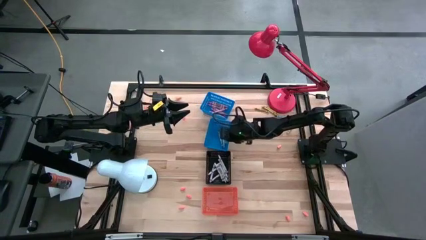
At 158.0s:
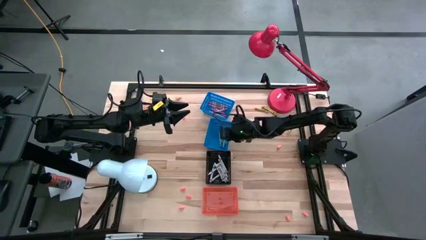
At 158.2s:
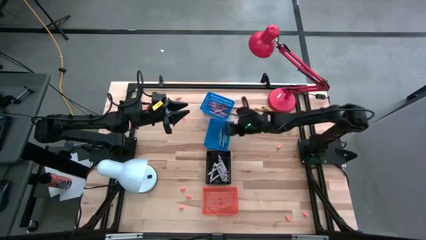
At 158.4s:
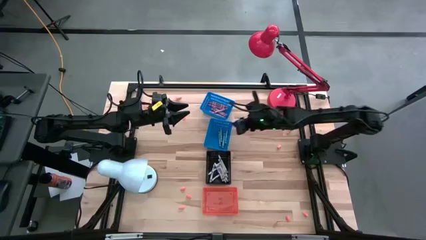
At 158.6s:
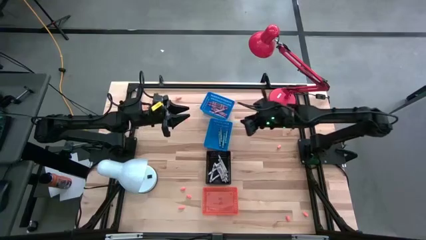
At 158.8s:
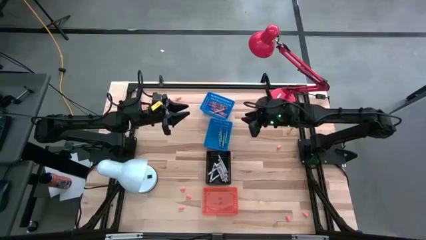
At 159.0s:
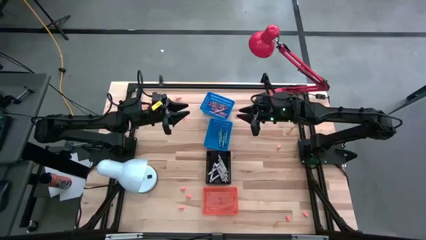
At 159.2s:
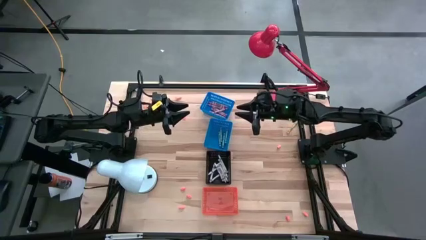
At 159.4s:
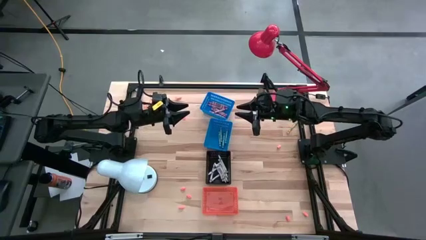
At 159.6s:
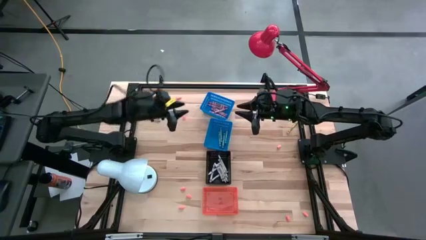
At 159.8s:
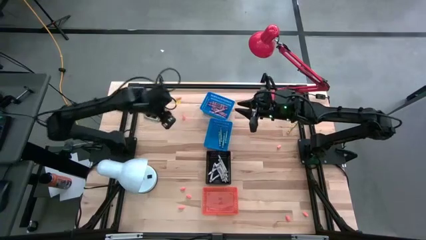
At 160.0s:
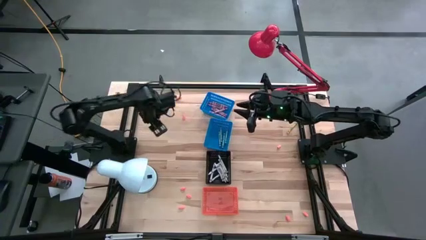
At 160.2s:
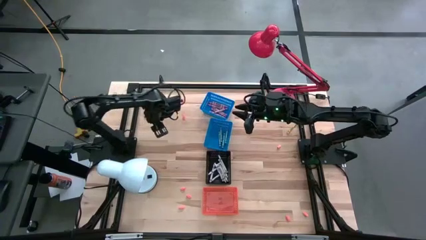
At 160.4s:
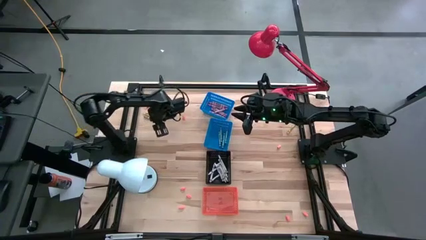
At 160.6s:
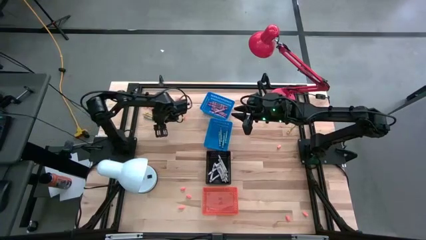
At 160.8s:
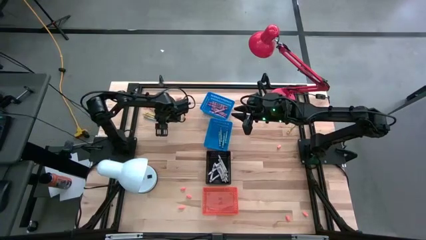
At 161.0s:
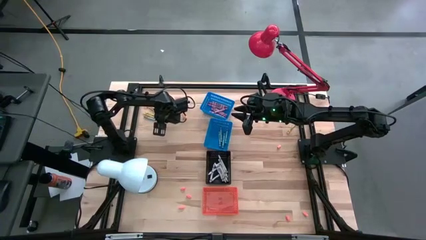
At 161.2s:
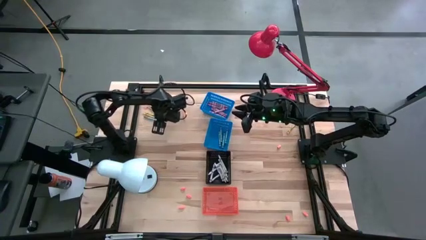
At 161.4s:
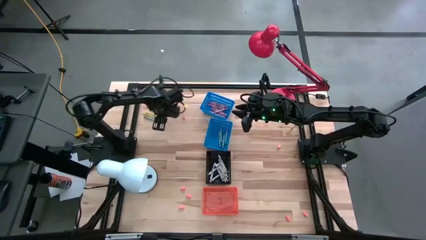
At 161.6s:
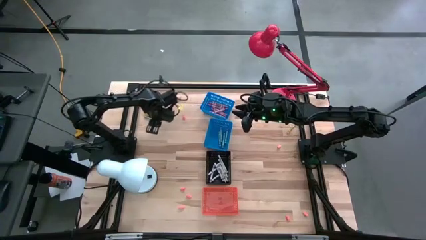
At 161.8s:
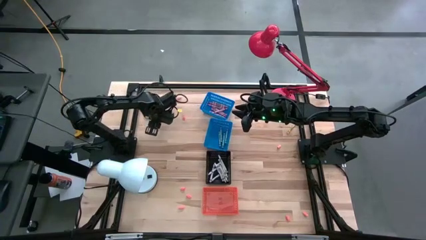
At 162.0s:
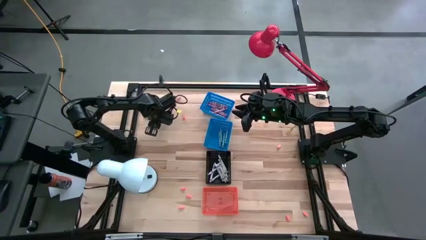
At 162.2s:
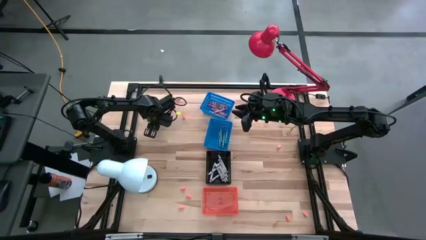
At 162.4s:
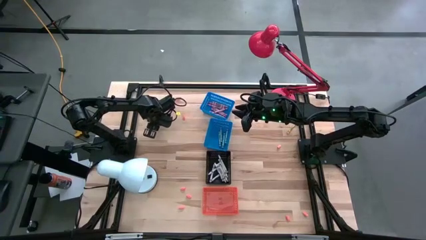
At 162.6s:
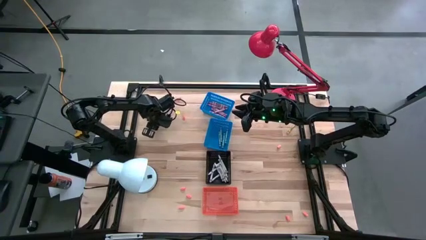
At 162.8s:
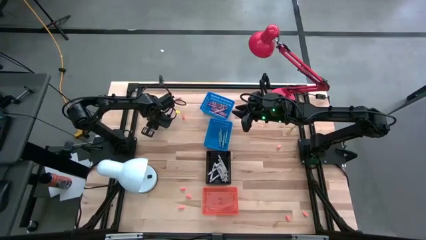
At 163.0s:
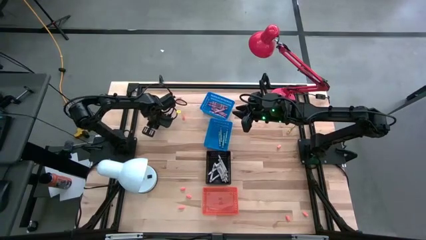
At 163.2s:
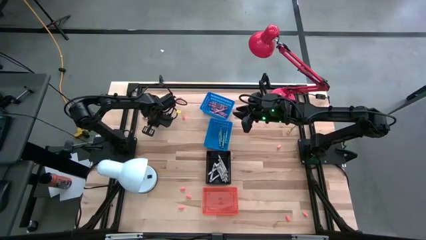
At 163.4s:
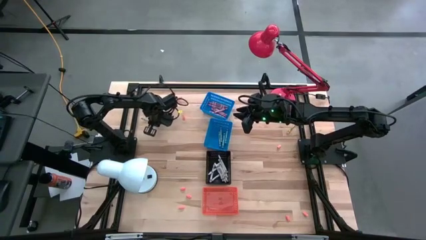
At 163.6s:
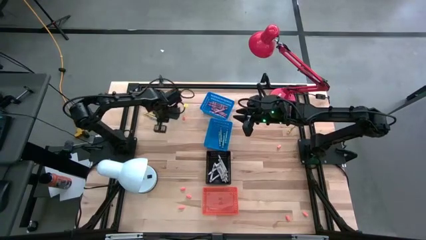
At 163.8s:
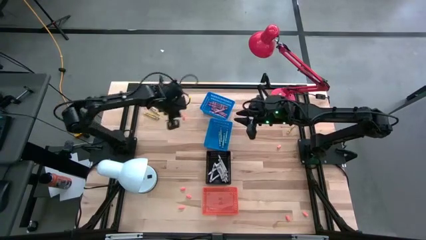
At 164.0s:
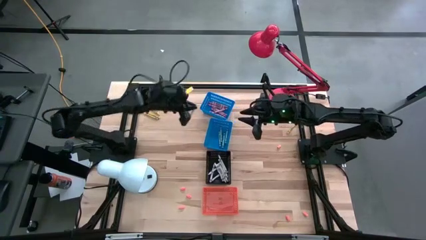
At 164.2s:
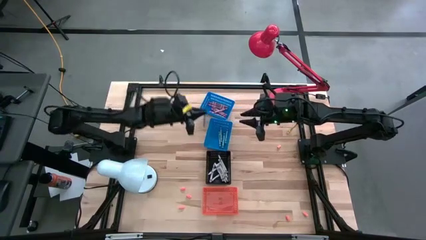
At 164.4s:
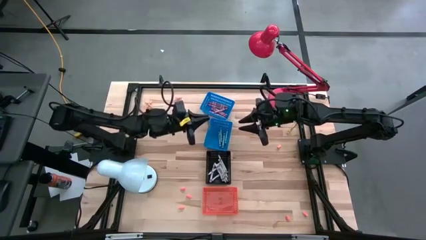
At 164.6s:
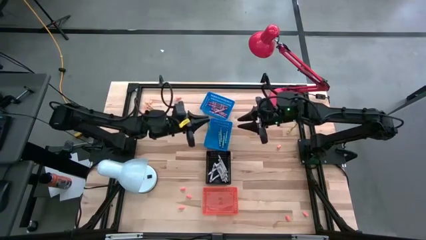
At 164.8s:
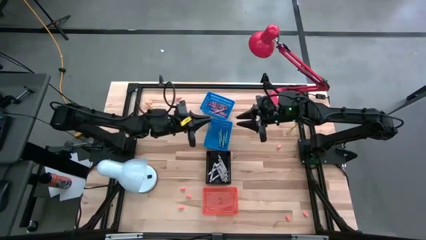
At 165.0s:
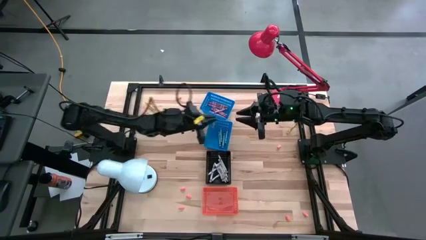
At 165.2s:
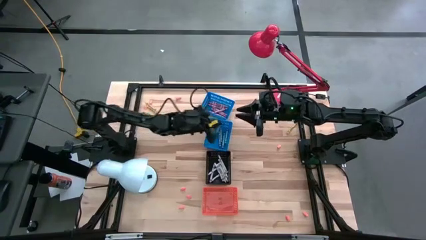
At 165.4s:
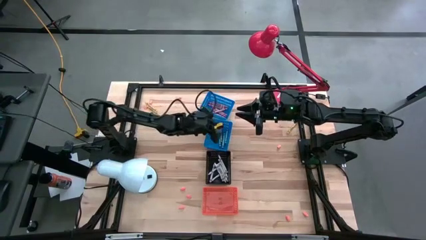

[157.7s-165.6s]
Task: Sort crayons
Put the blue crayon into the bottom blue bin

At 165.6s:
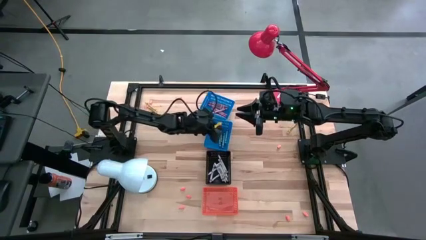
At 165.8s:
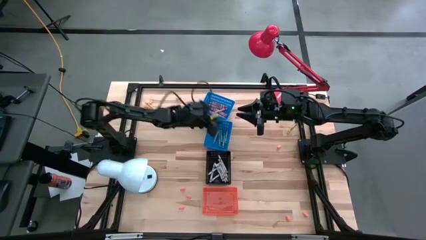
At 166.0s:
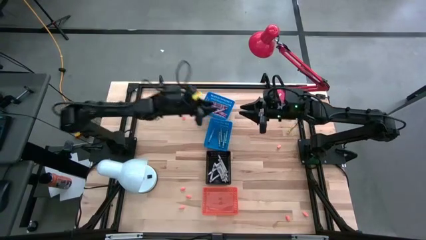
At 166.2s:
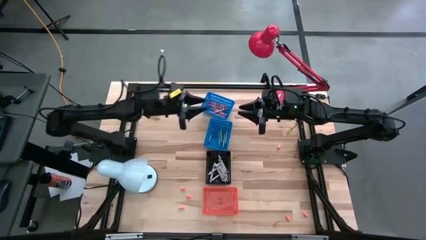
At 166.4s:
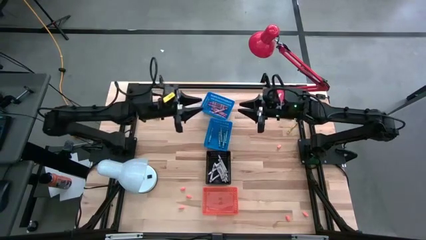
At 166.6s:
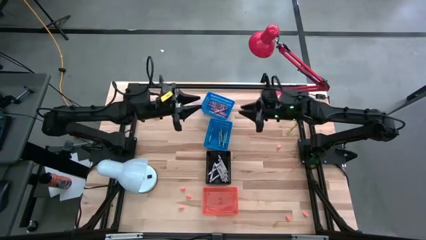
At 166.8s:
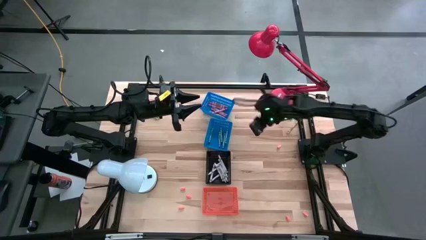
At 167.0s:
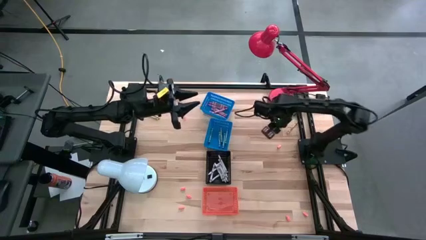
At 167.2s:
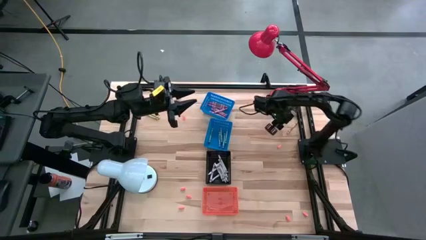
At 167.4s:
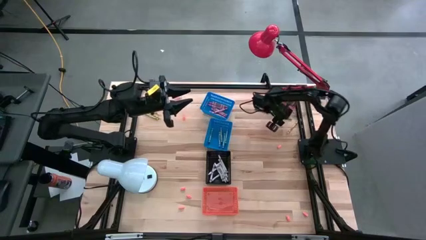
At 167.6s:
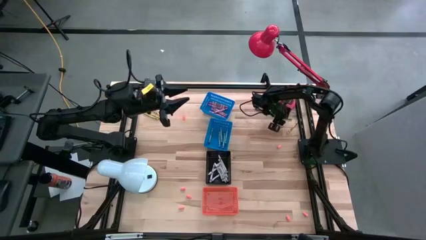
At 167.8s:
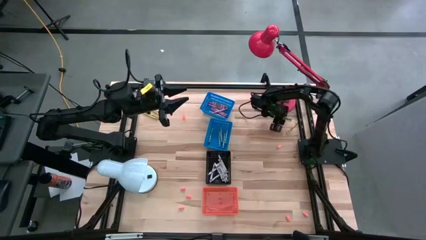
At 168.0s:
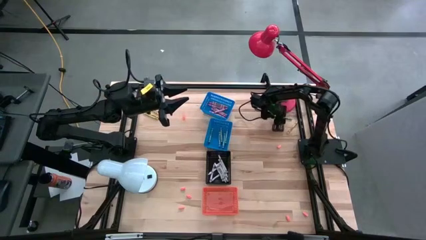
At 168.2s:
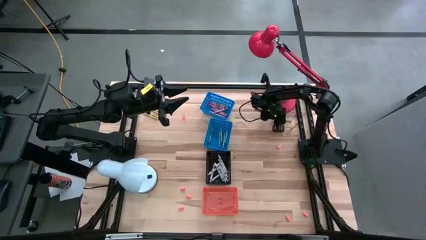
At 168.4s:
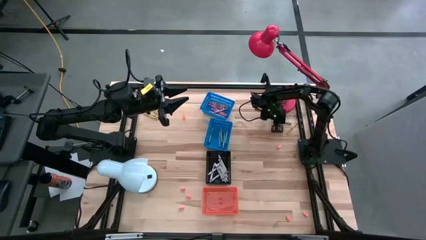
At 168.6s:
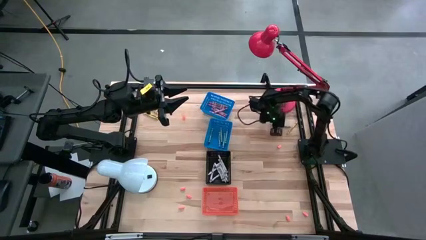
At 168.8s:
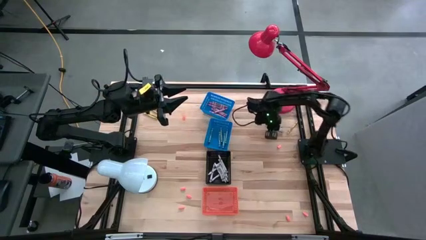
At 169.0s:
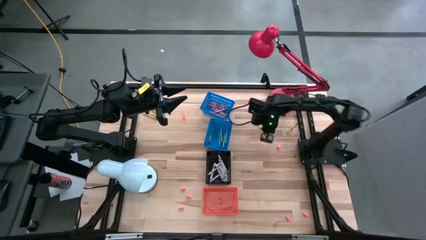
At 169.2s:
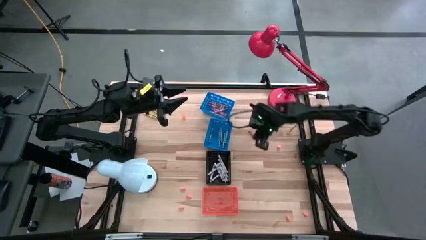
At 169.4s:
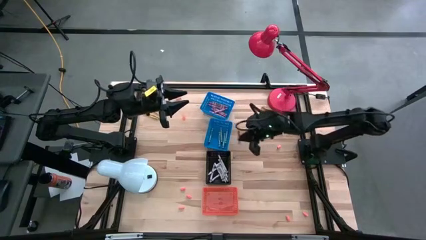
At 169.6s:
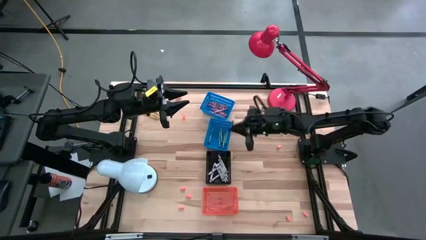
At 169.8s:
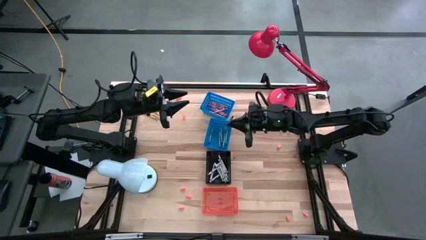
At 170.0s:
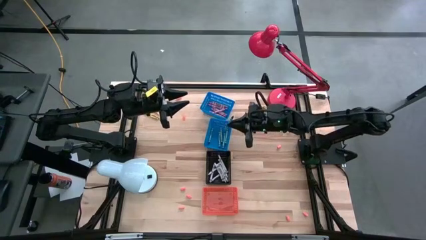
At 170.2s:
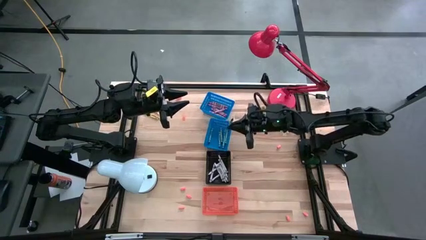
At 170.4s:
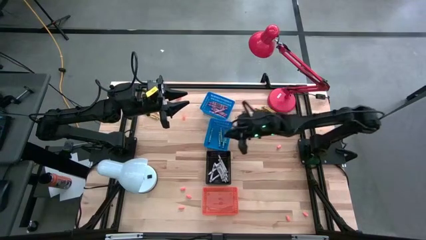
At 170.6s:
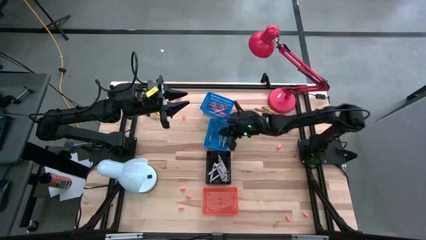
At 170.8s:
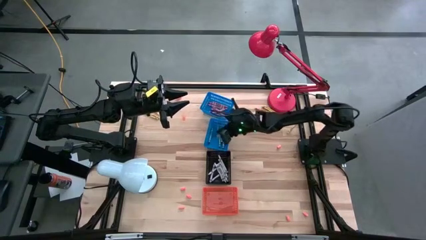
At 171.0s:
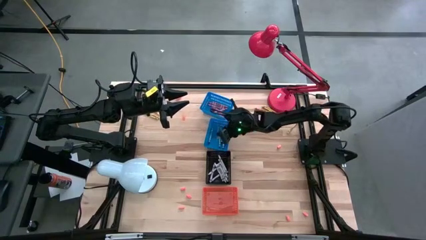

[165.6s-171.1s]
Put the blue crayon into the bottom blue bin
